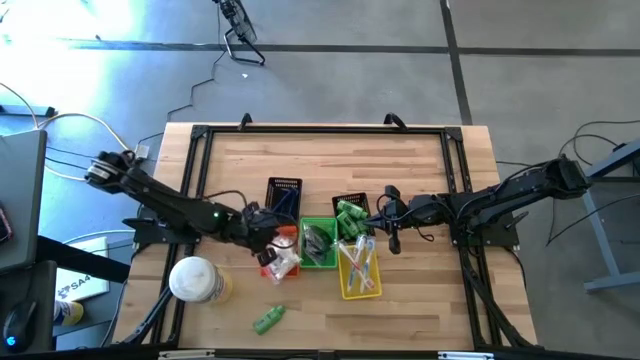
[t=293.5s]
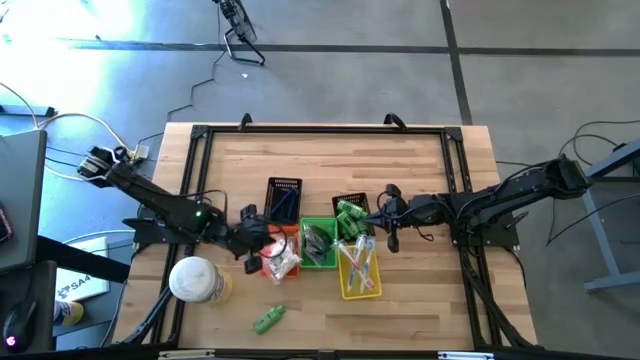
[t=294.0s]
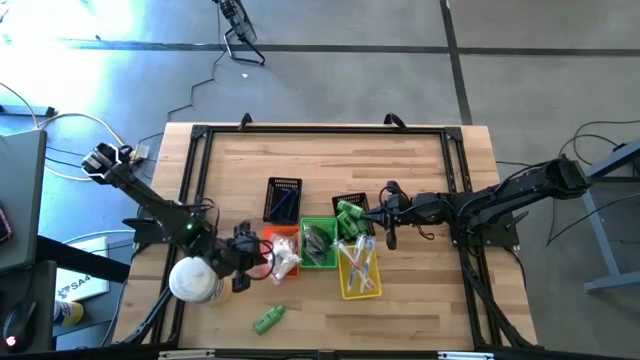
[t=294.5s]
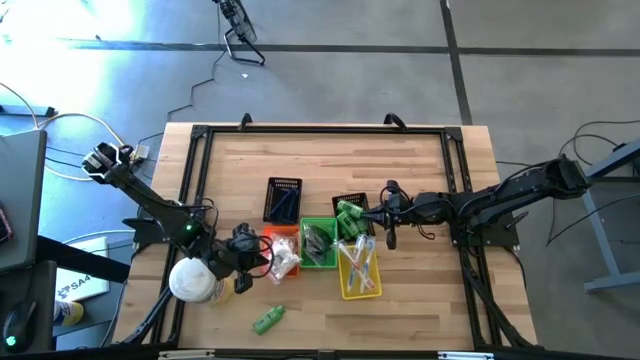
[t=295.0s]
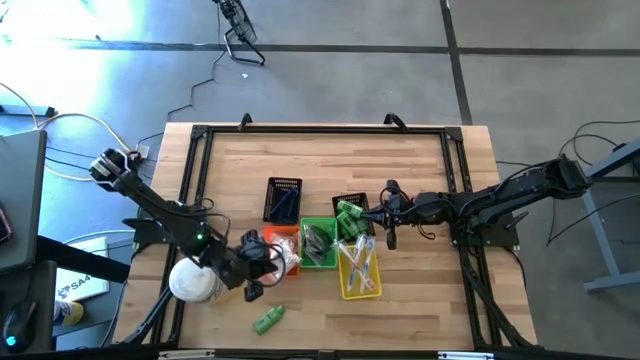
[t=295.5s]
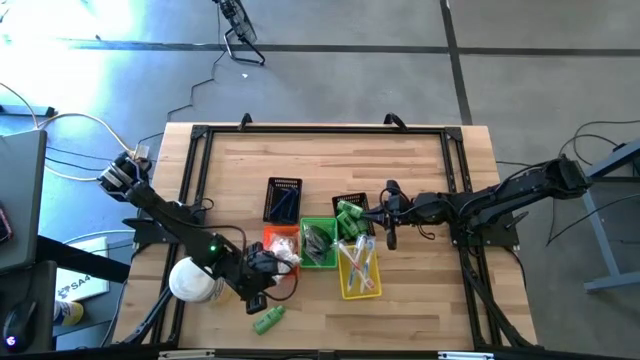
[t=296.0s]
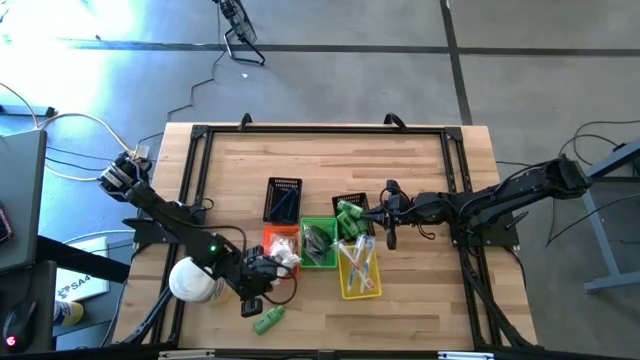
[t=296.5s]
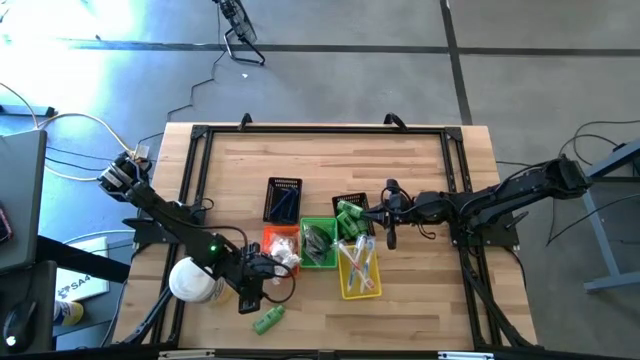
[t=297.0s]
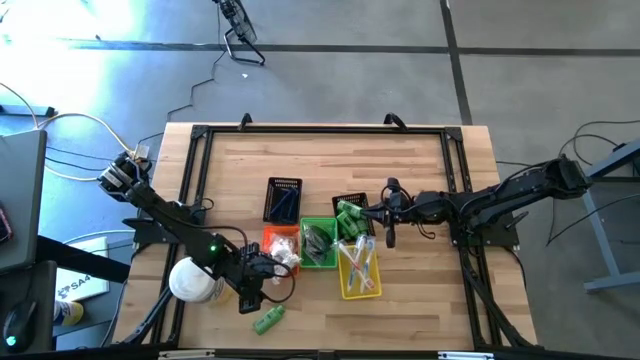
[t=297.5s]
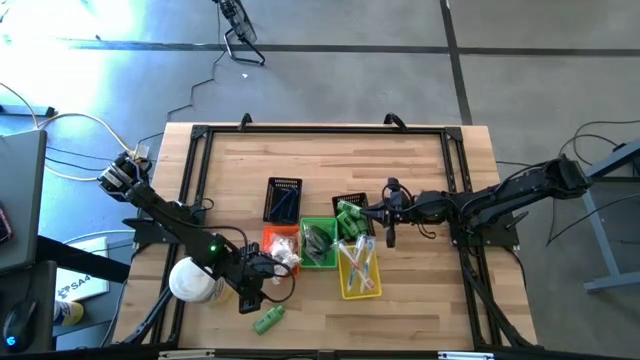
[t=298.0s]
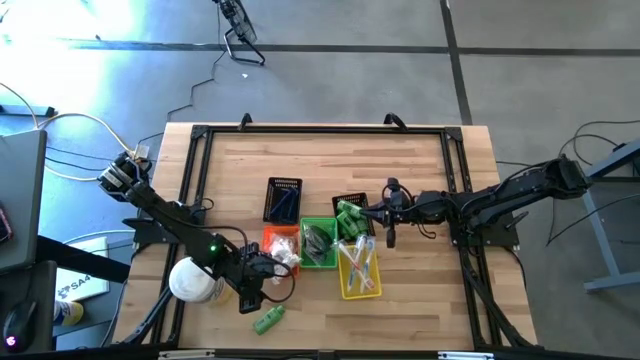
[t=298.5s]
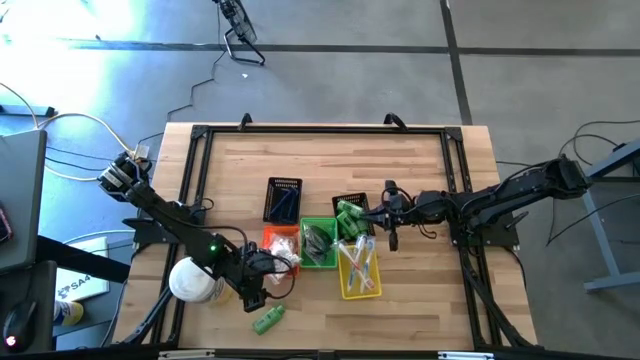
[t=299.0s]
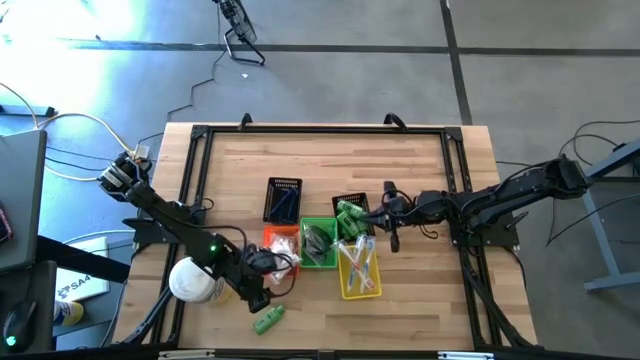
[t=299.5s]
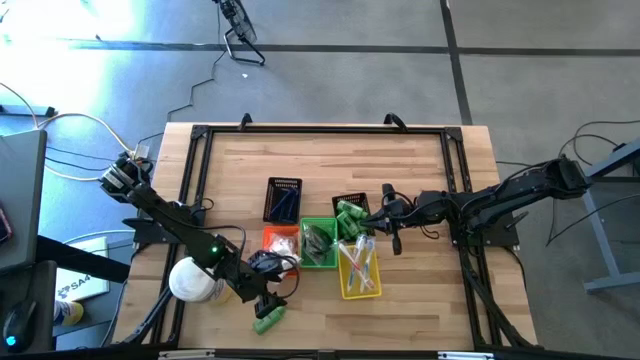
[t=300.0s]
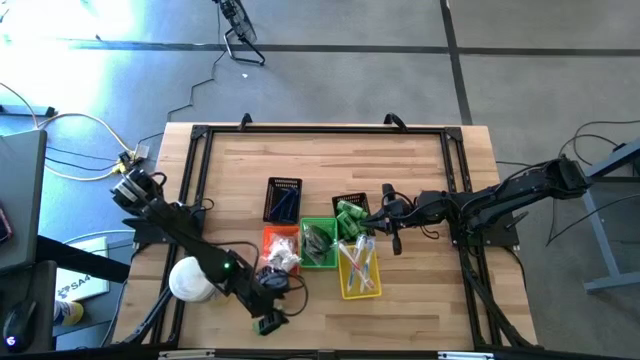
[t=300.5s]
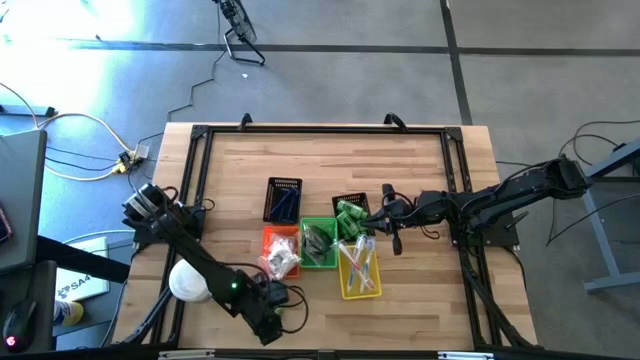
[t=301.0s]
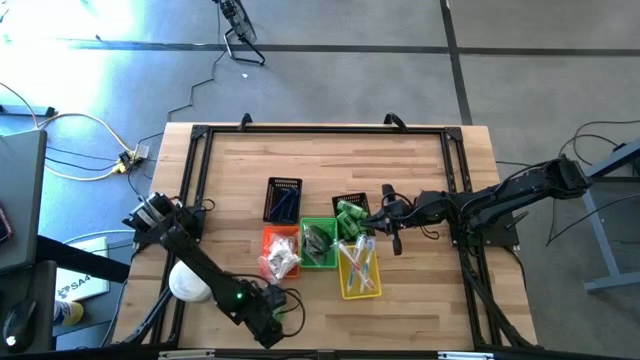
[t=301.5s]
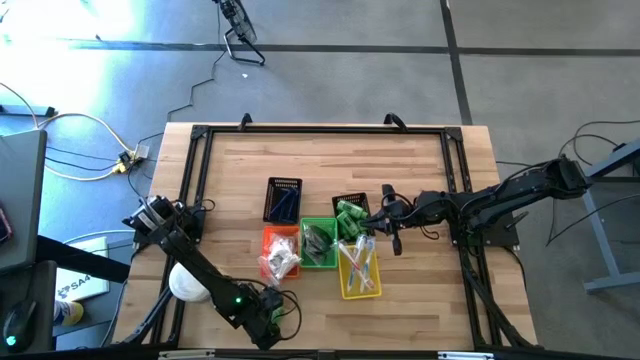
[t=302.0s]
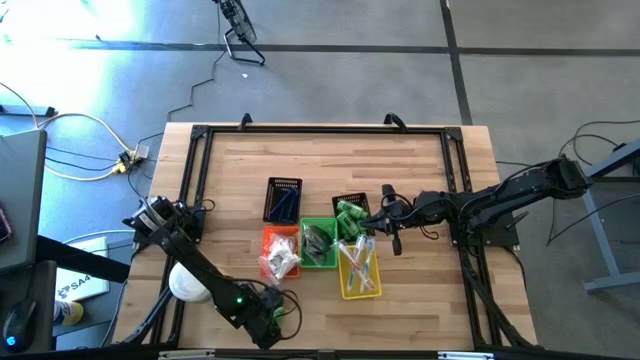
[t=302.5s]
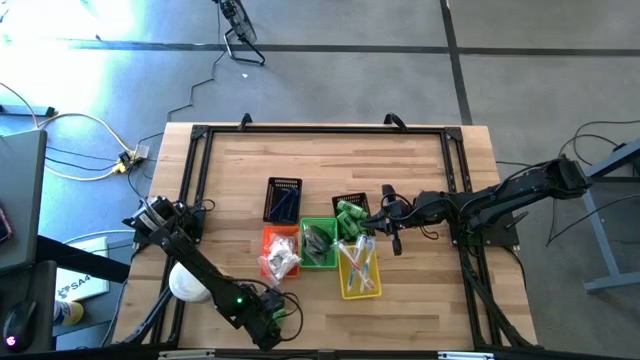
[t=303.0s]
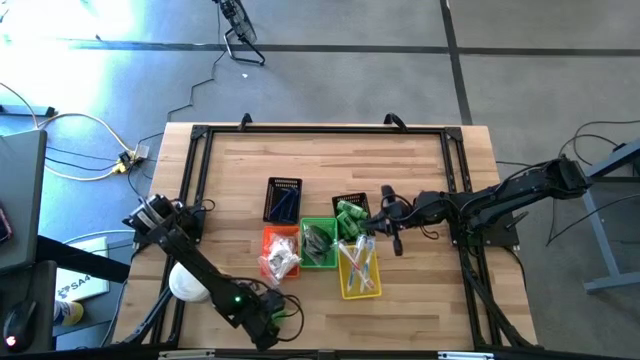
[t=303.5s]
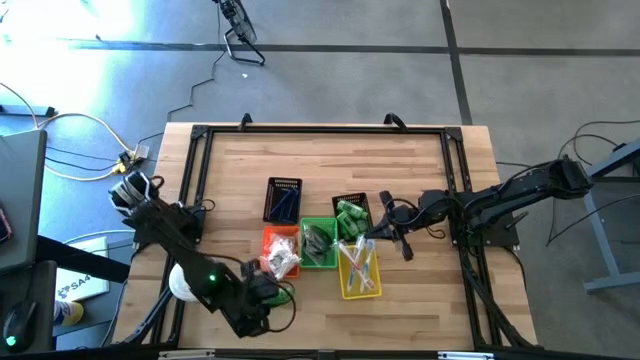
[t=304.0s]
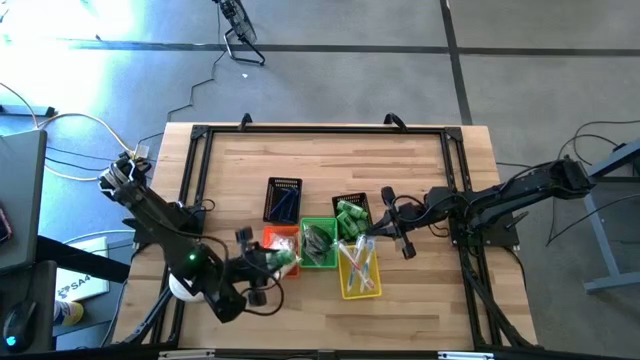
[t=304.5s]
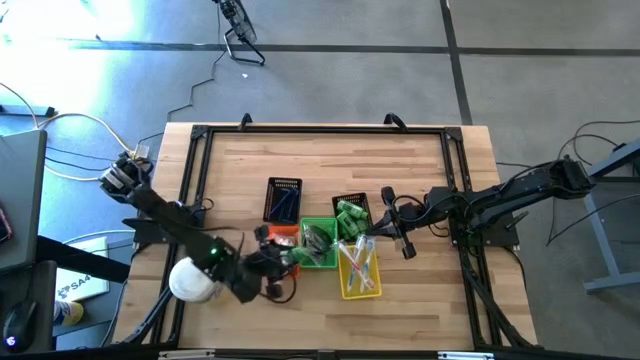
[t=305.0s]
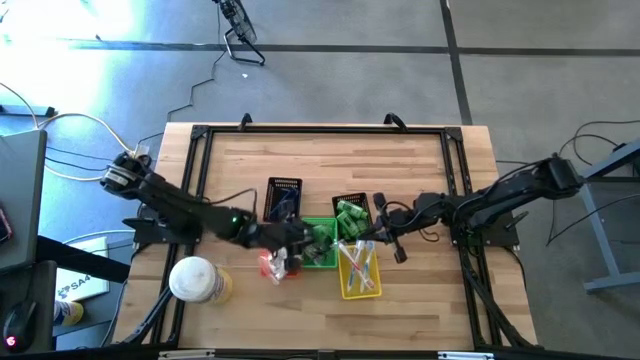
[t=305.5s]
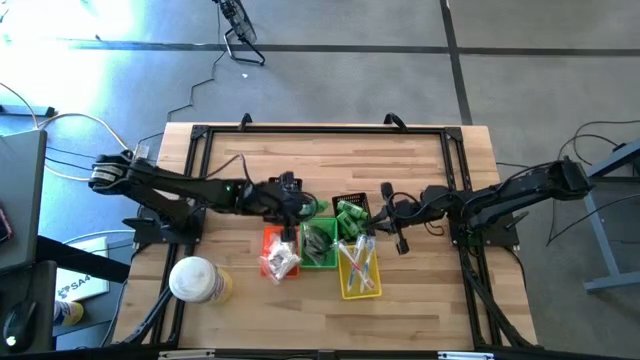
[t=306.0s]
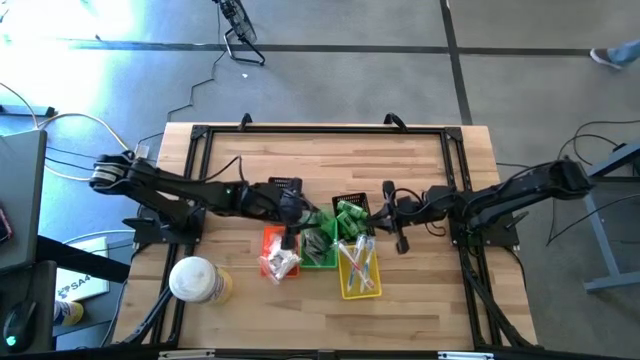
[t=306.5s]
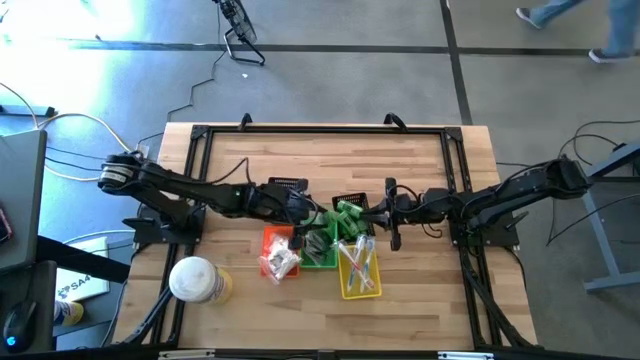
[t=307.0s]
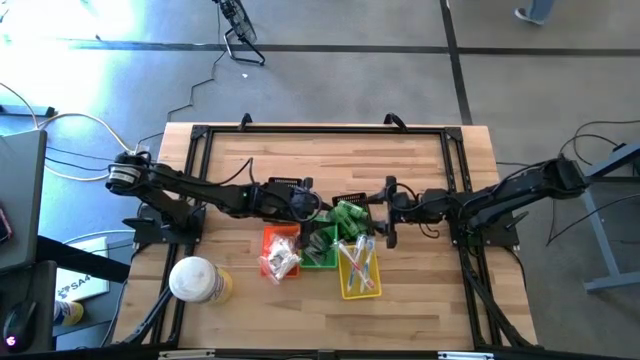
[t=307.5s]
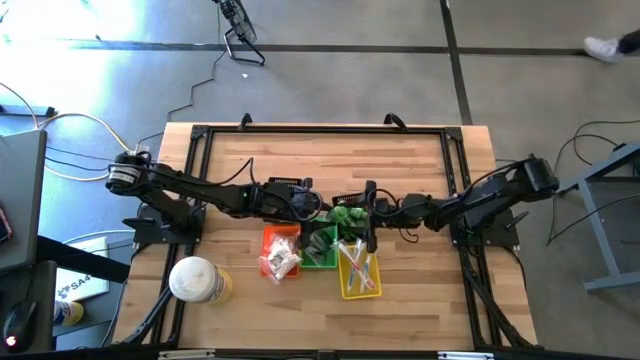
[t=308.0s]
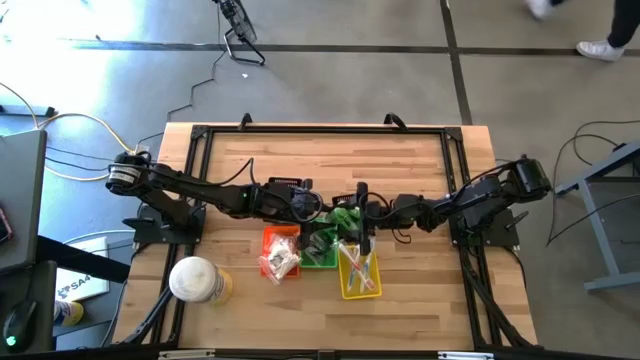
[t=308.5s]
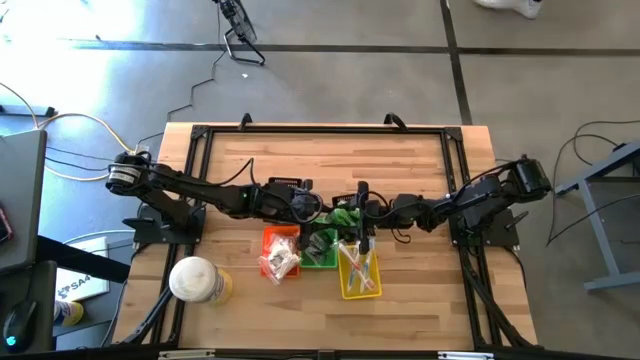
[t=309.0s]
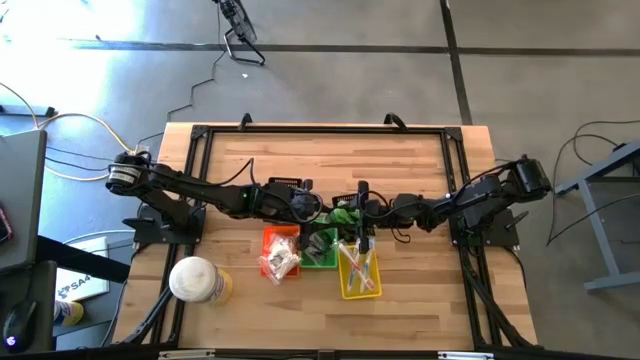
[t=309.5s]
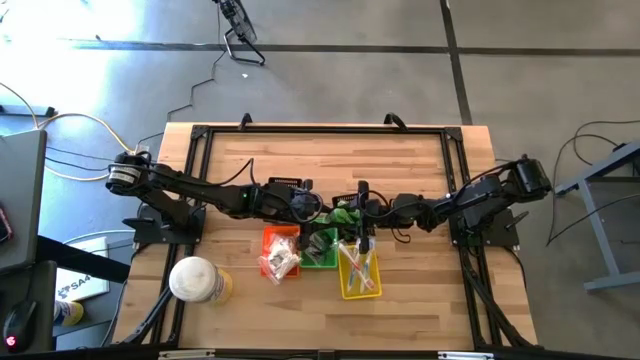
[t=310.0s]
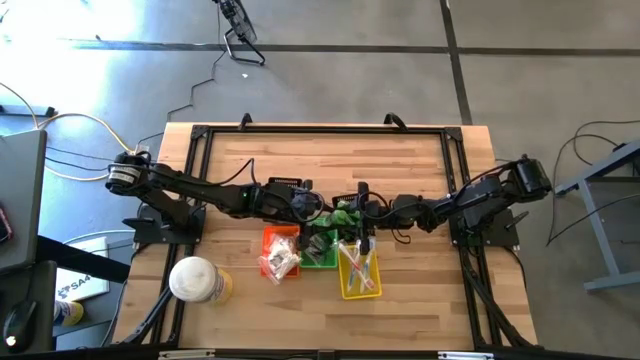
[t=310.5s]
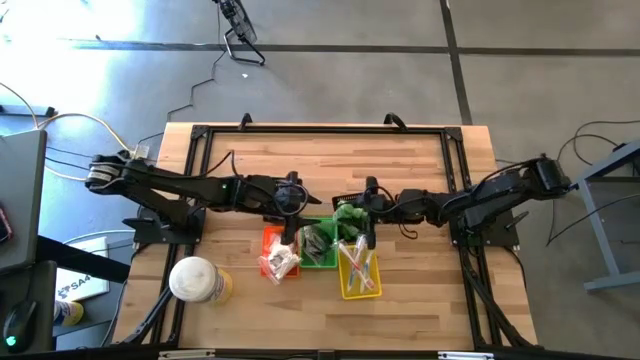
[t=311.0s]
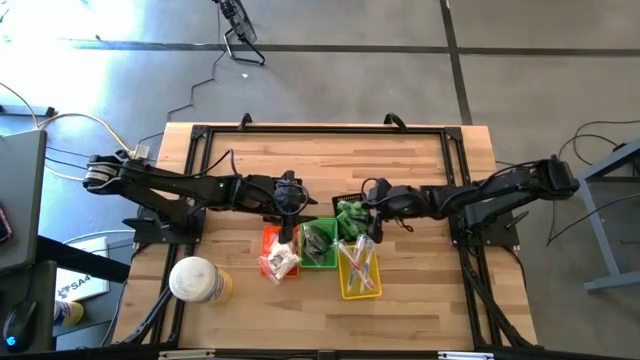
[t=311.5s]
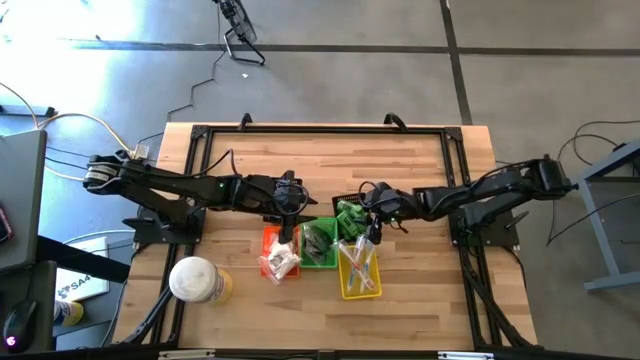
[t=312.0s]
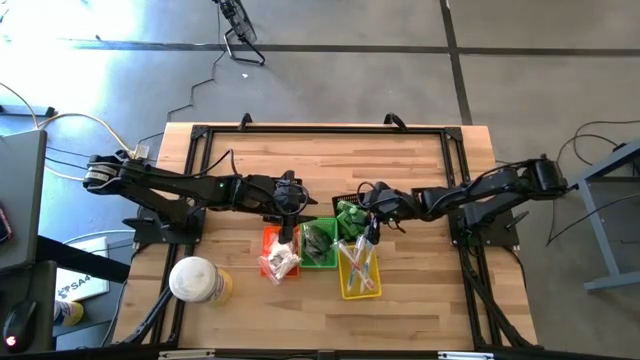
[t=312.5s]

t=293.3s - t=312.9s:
Task: Pick & Place Travel size toiletries
Put the green shampoo into the right black bin
